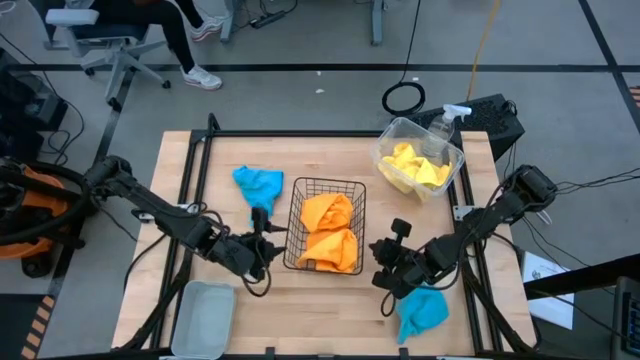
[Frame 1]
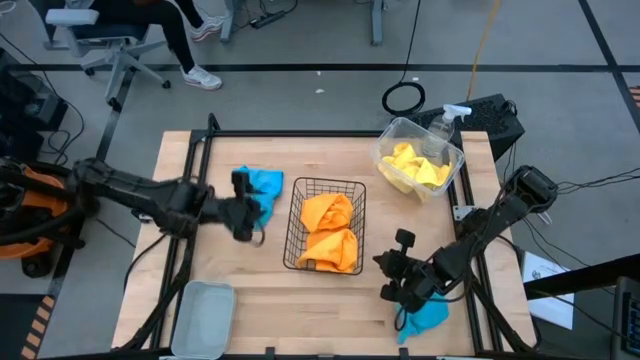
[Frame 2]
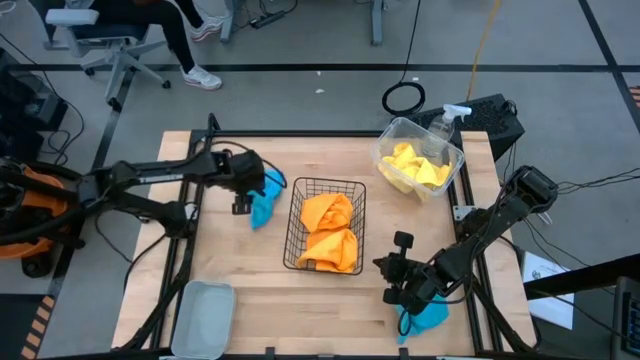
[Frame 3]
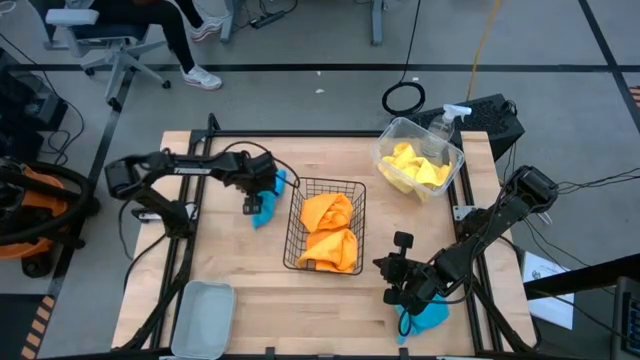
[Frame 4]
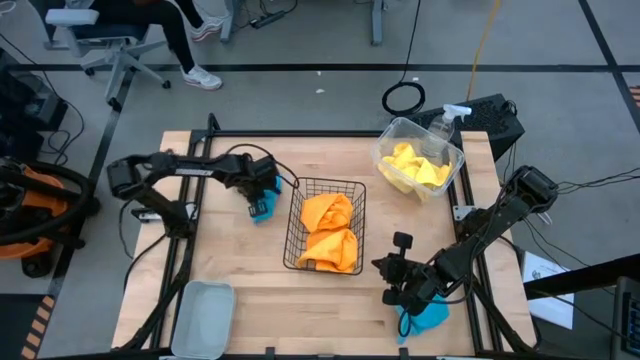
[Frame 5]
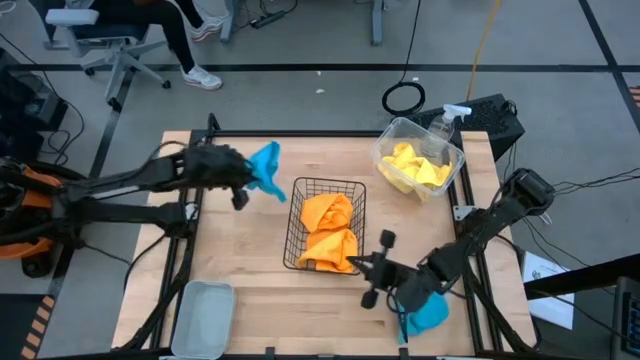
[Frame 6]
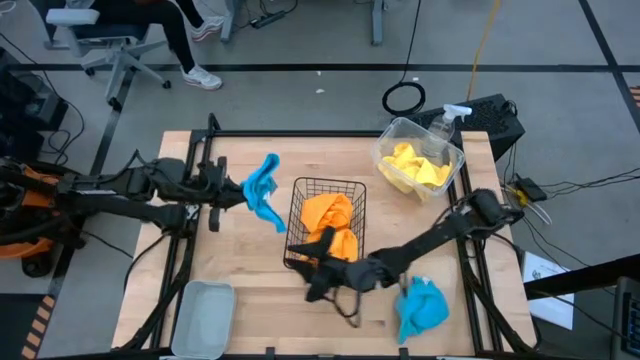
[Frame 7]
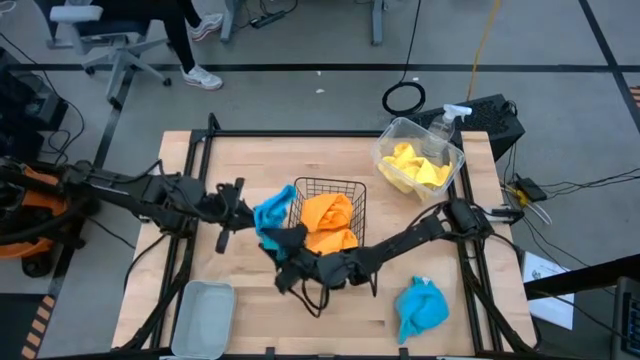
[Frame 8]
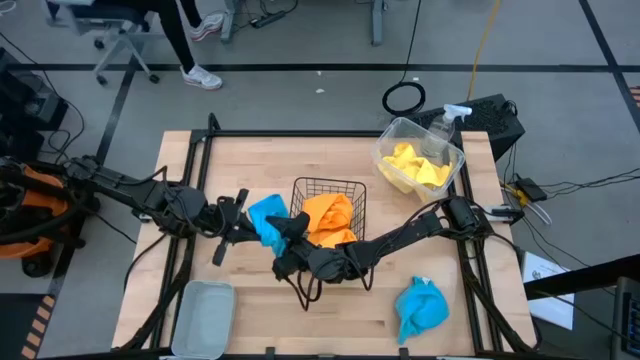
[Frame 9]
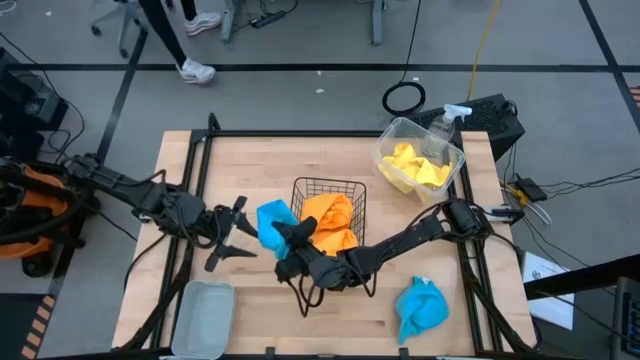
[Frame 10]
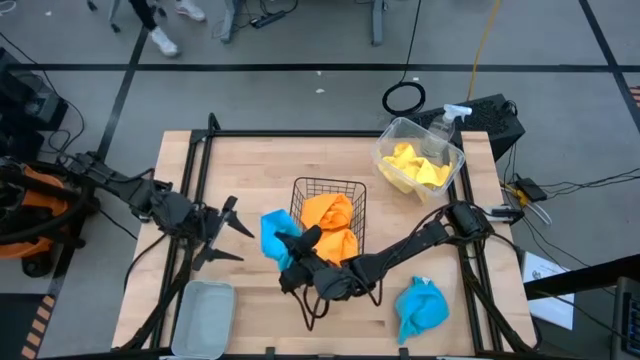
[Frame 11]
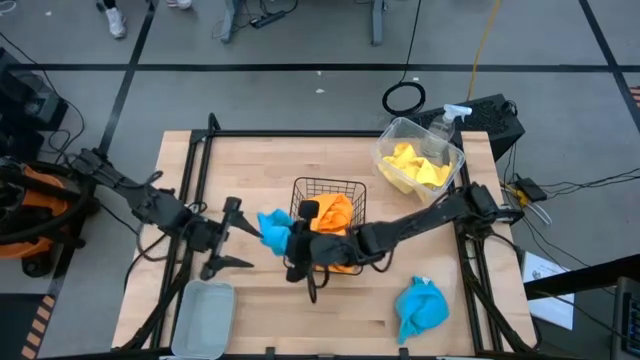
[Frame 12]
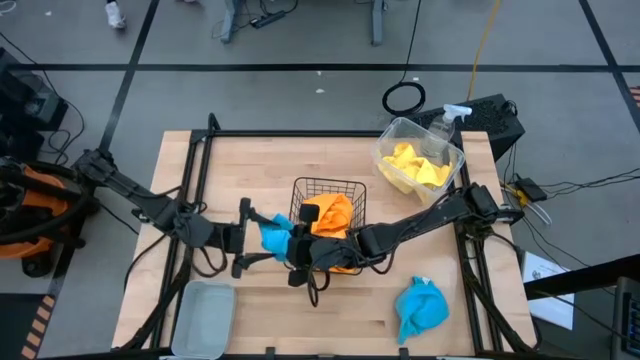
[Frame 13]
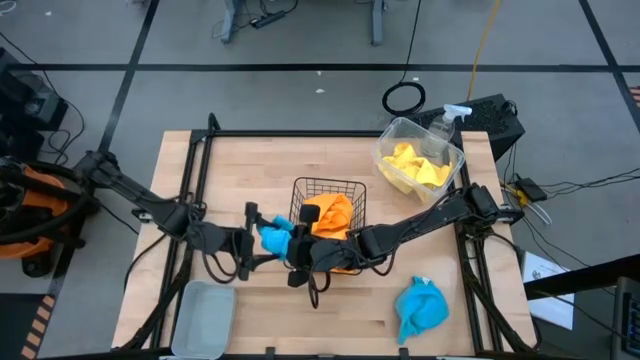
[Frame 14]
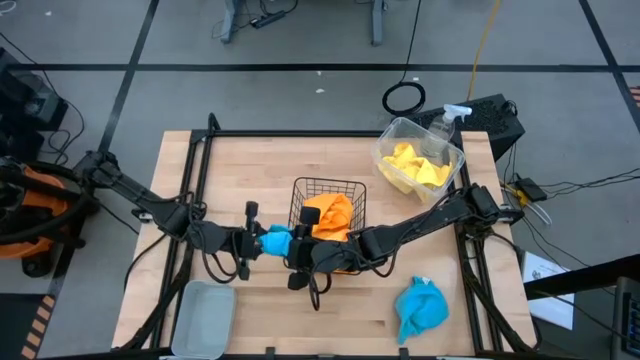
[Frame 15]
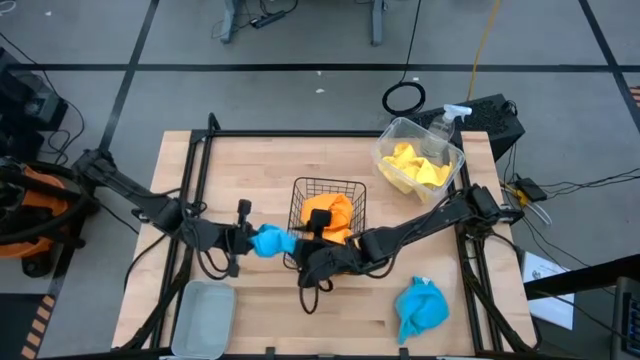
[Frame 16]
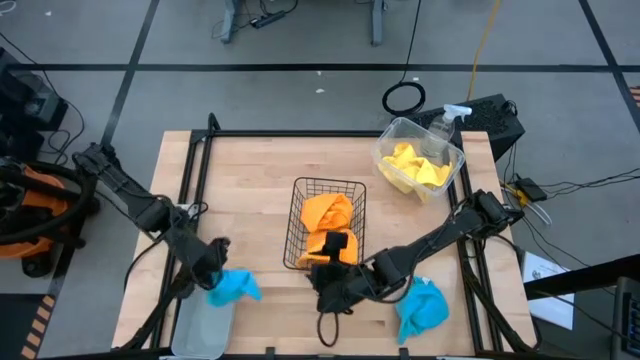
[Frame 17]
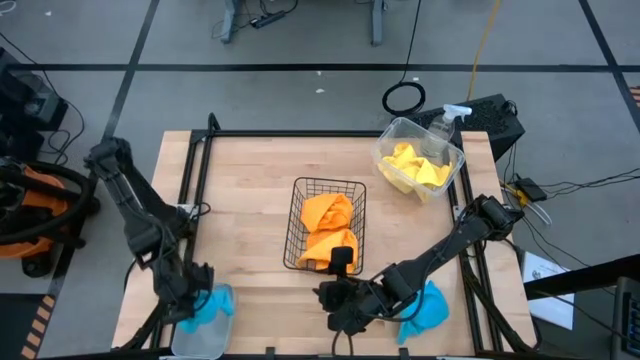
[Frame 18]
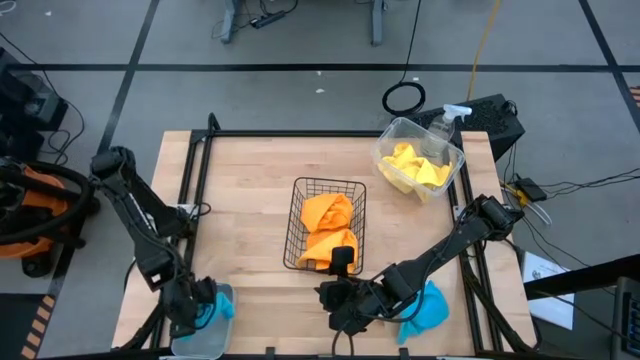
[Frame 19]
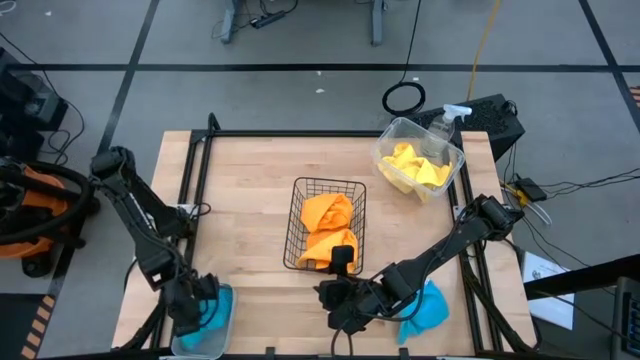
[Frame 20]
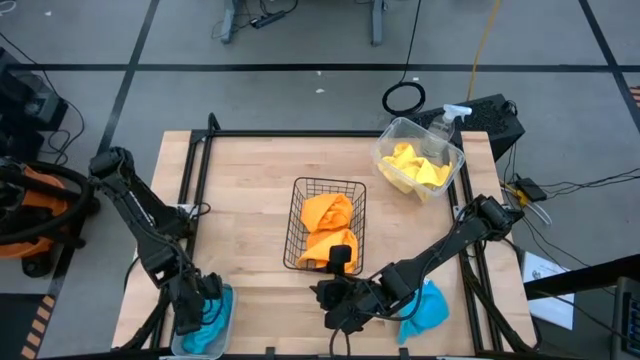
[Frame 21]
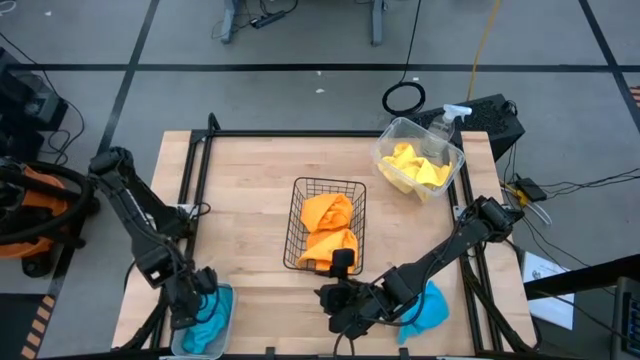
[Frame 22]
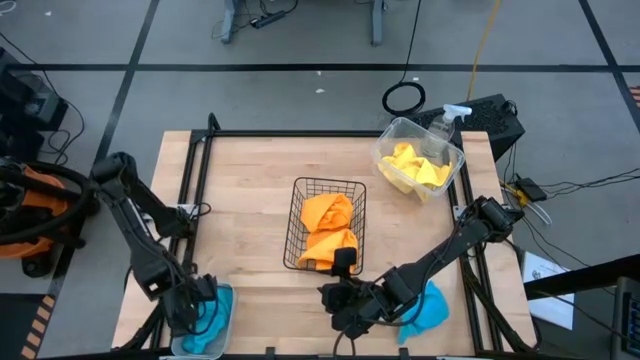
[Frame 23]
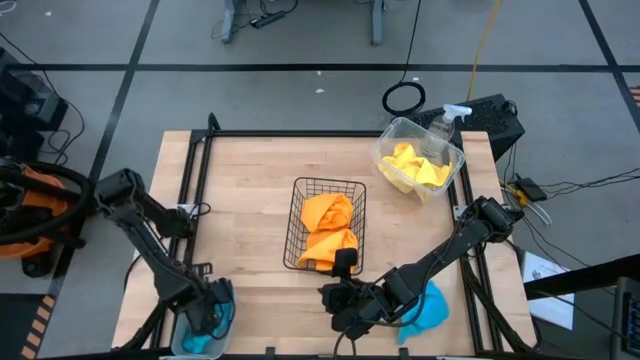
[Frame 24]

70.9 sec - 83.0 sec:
Task: Sort microfiber towel by color & place in baskets
Put the top blue microfiber towel into the gray bin

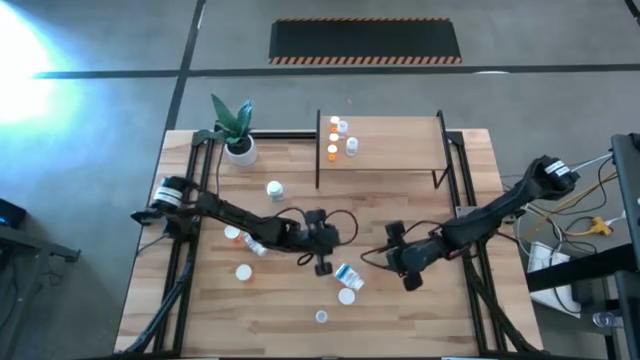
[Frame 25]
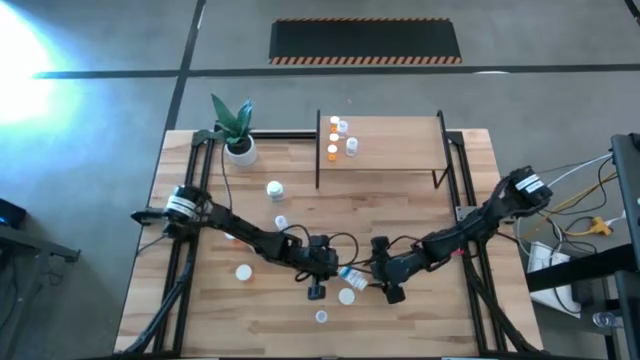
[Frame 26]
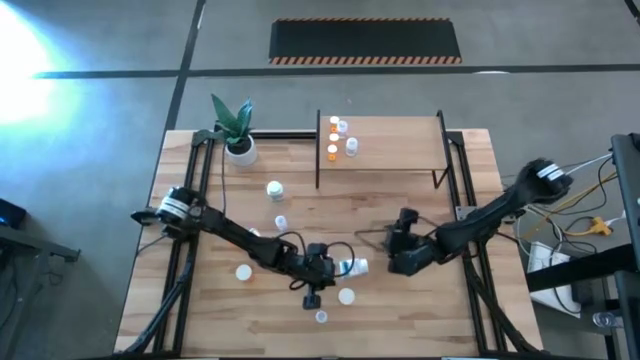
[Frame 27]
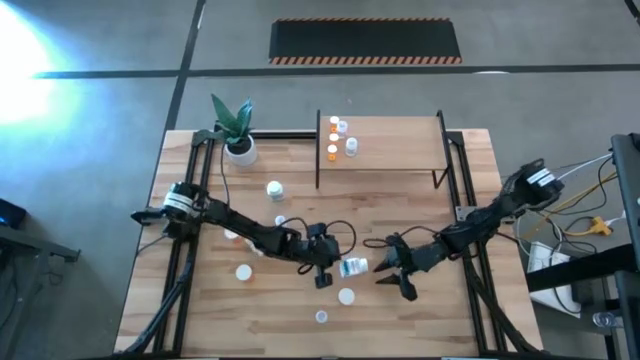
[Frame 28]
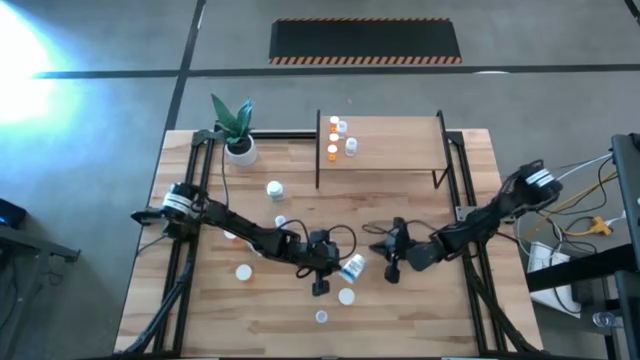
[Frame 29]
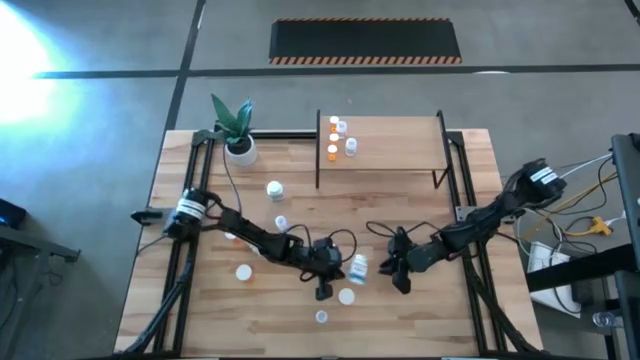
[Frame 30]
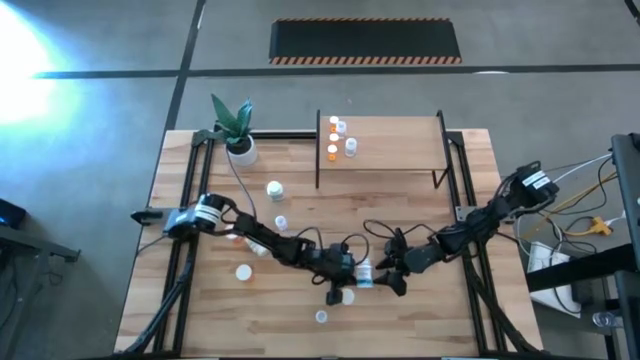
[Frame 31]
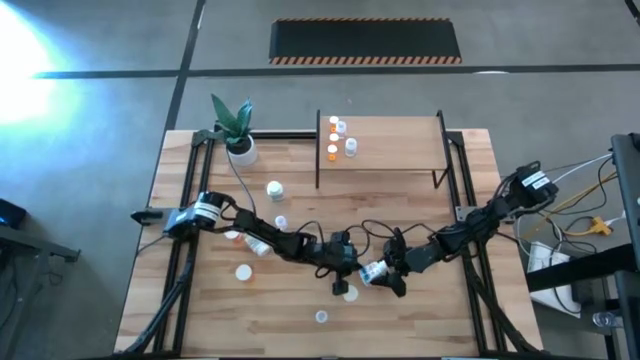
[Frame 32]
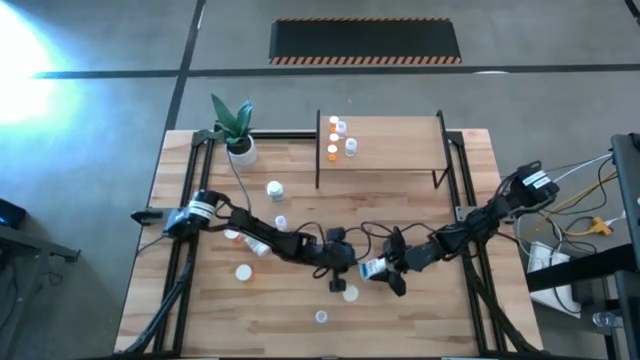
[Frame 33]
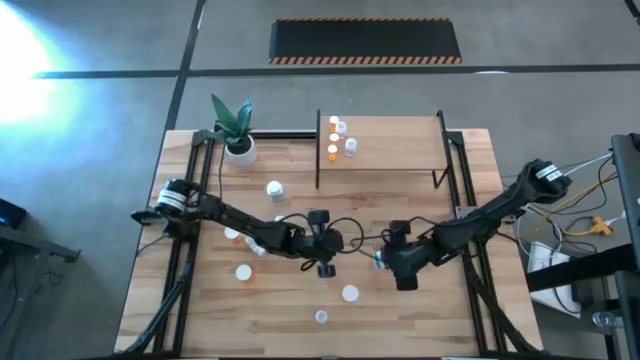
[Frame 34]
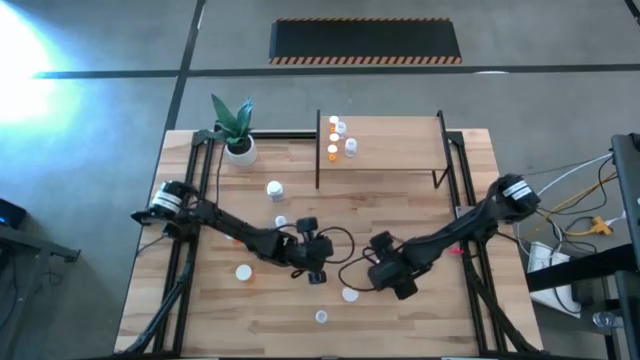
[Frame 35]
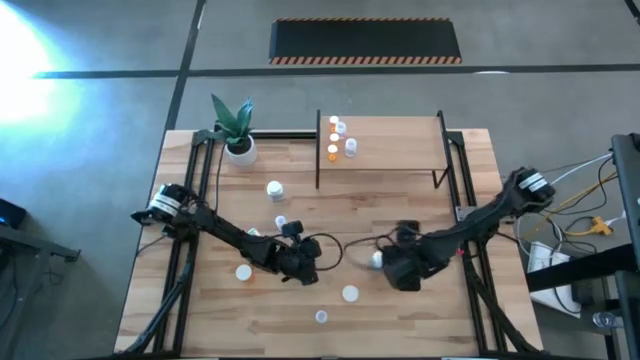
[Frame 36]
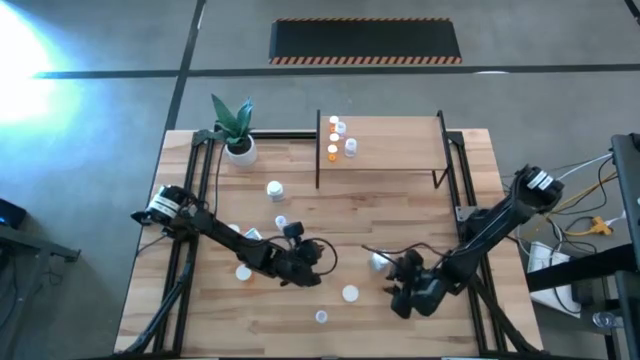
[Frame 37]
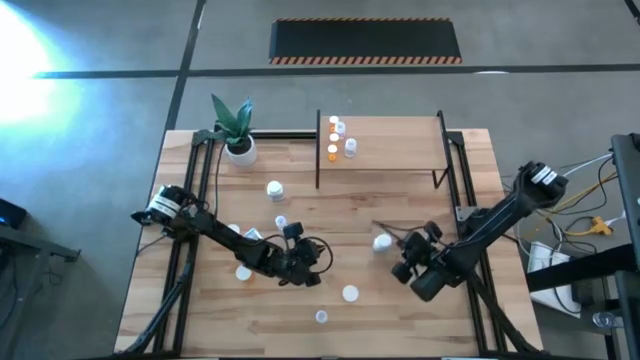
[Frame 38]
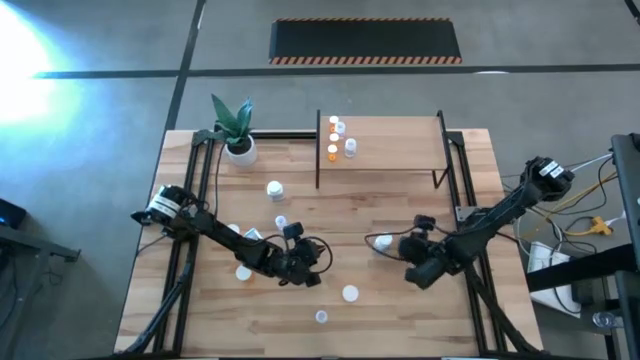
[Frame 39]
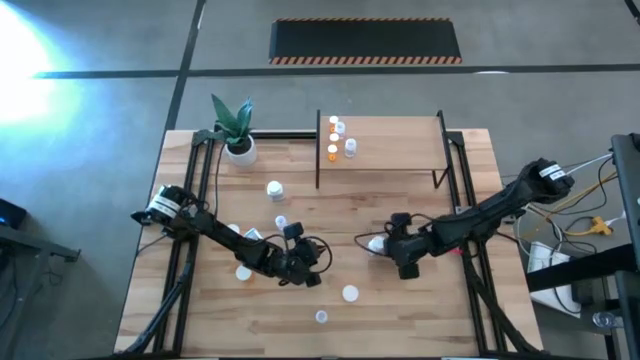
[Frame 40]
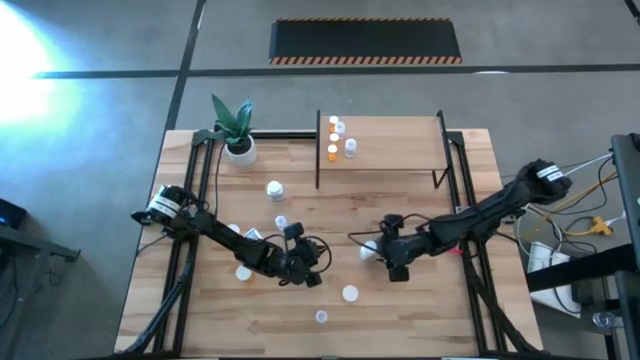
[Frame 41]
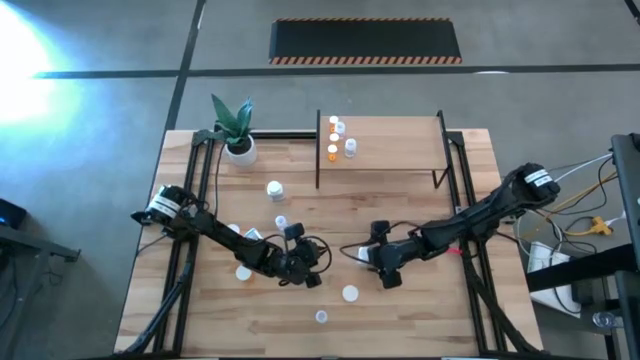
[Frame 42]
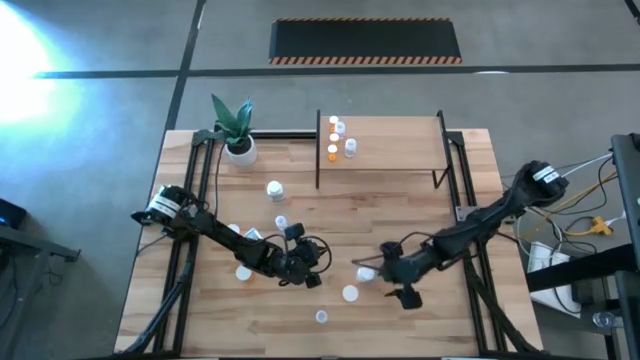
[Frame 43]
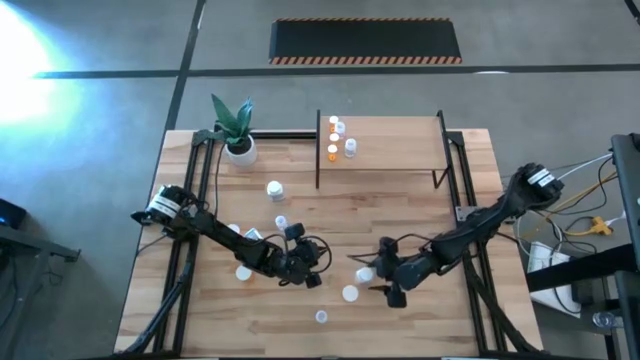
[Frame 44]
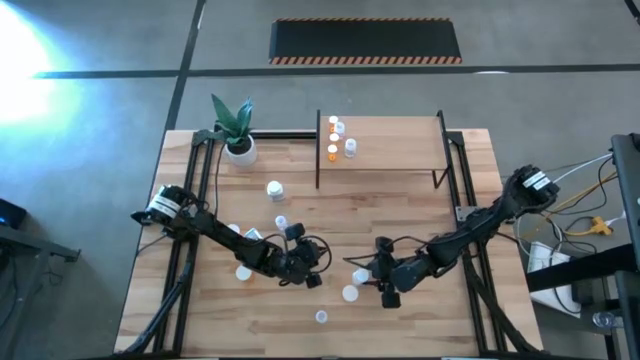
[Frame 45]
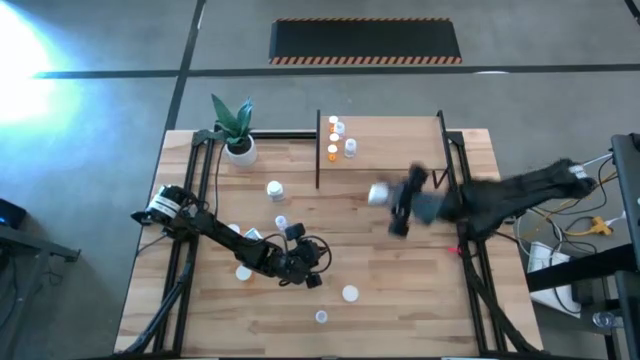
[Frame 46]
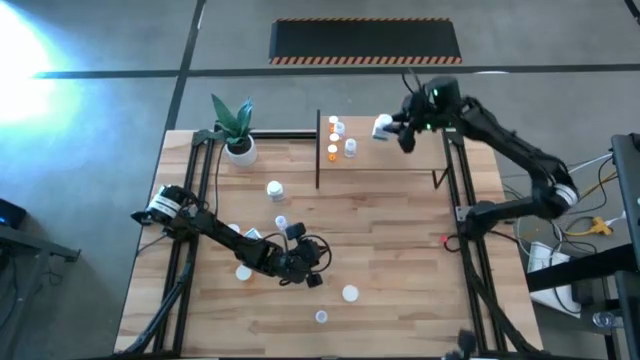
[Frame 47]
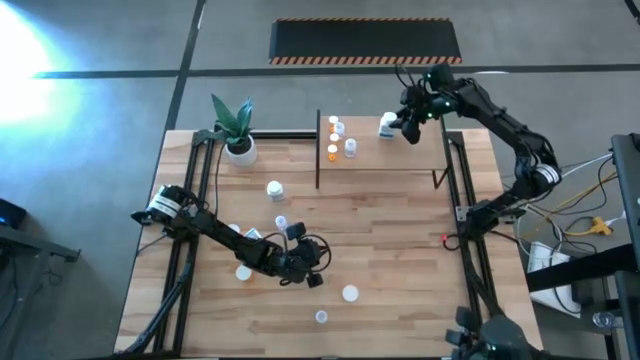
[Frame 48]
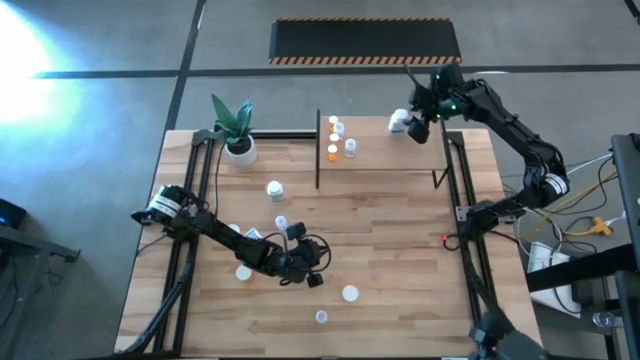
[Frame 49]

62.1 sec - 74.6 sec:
Task: Pick and place medicine bottles onto shelf by color
Put the white pill bottle on the shelf
